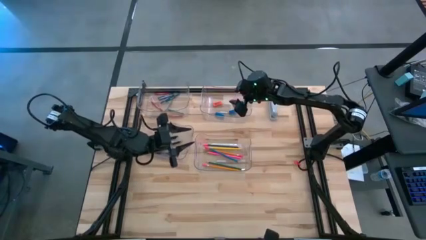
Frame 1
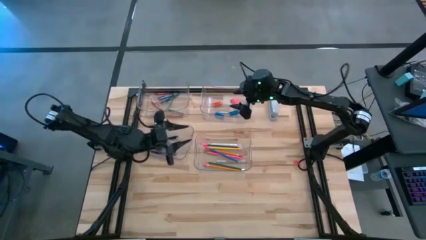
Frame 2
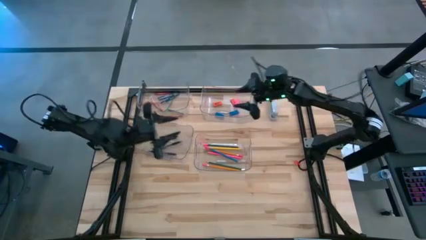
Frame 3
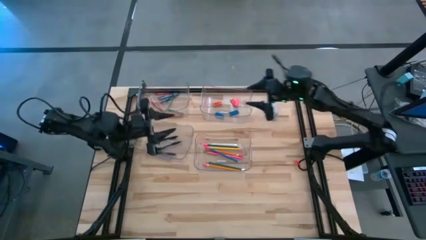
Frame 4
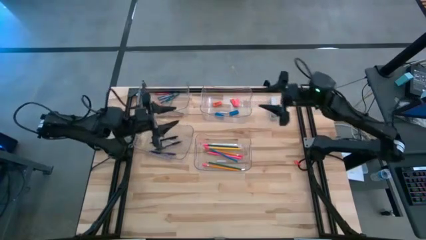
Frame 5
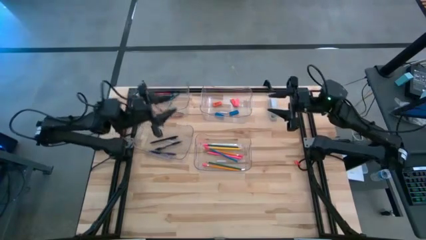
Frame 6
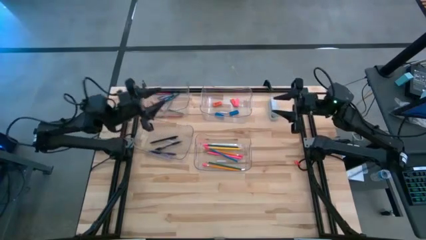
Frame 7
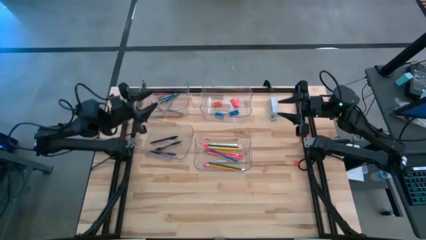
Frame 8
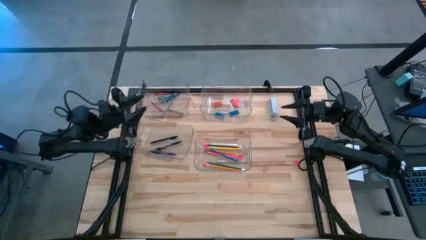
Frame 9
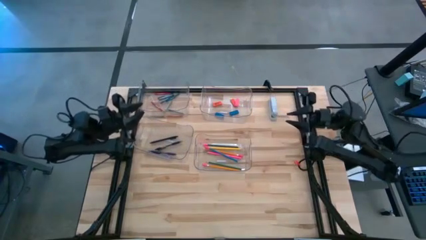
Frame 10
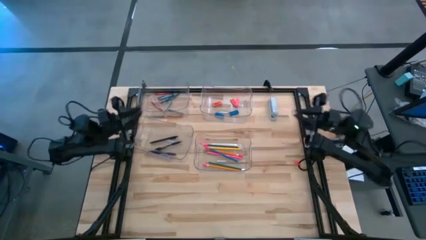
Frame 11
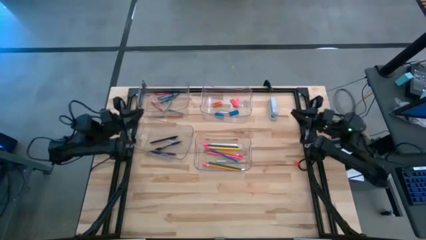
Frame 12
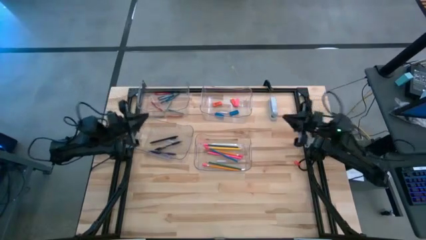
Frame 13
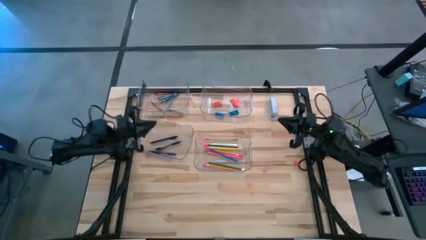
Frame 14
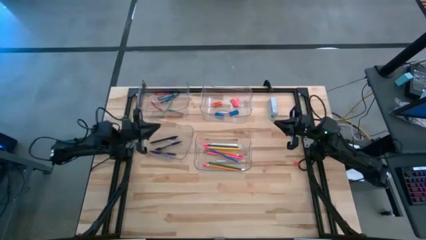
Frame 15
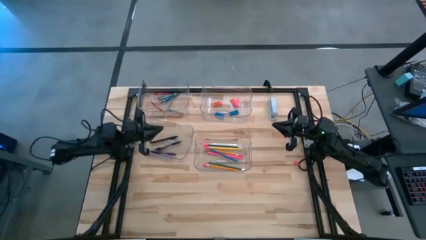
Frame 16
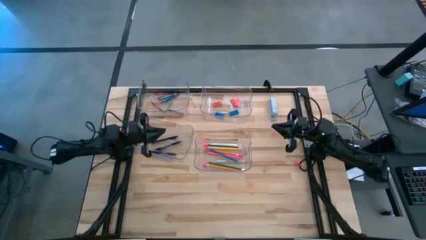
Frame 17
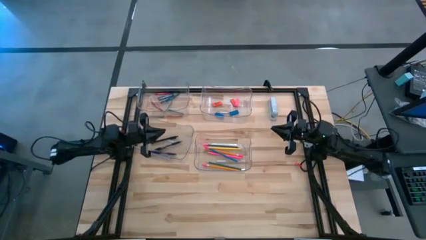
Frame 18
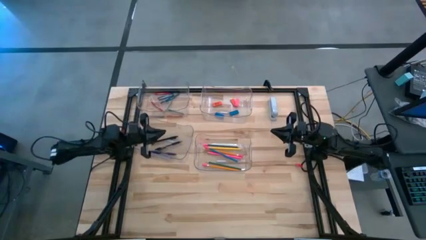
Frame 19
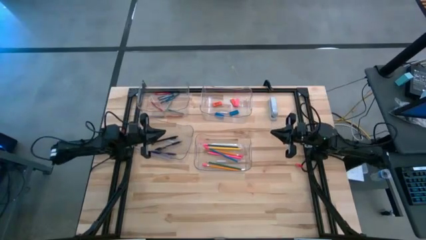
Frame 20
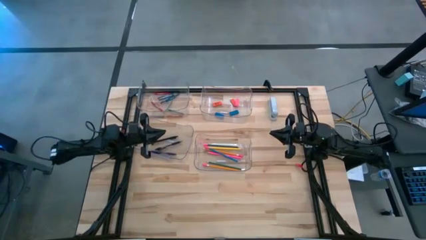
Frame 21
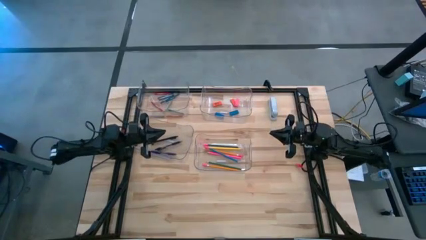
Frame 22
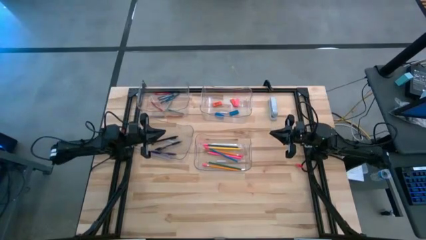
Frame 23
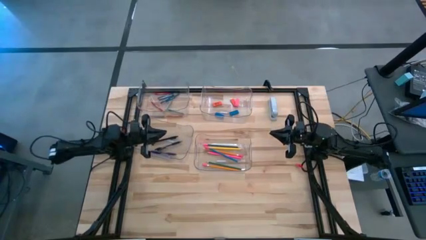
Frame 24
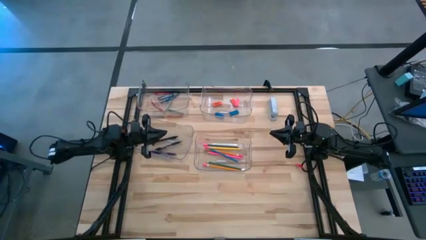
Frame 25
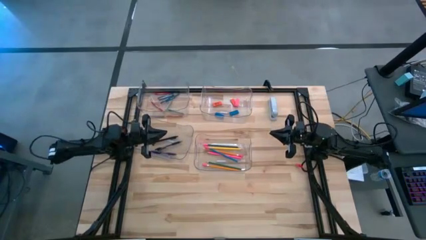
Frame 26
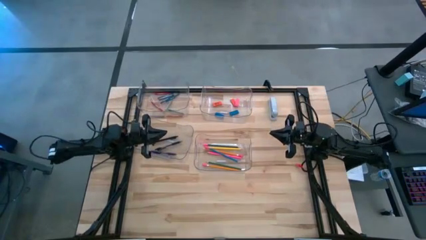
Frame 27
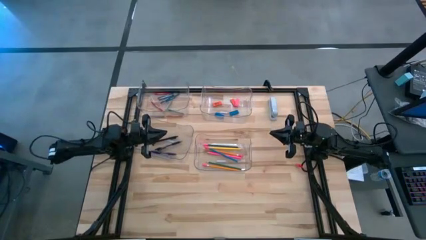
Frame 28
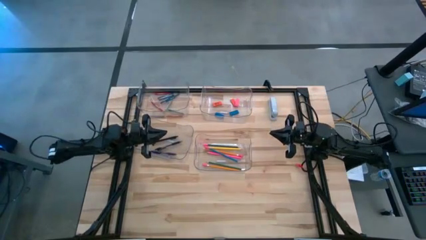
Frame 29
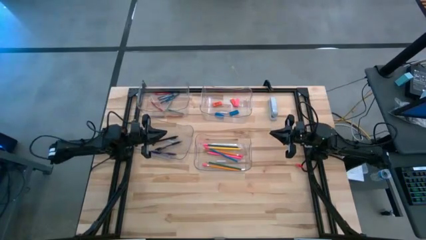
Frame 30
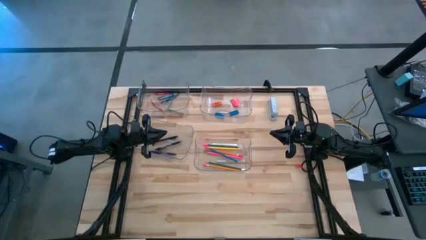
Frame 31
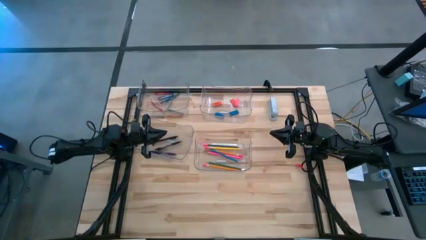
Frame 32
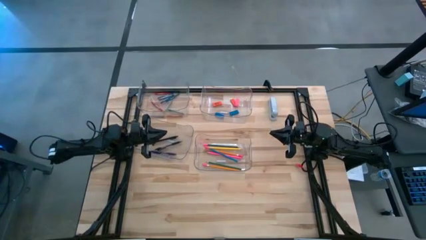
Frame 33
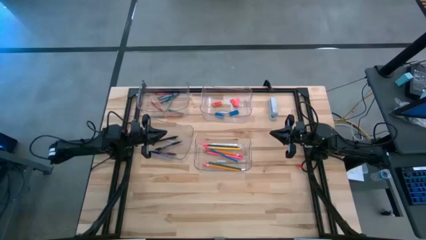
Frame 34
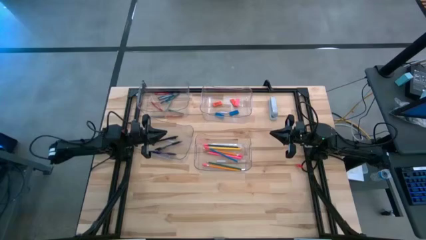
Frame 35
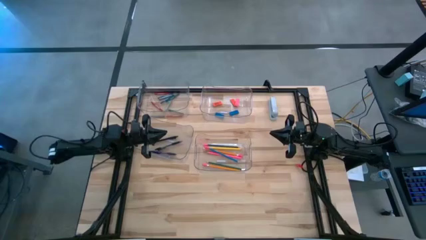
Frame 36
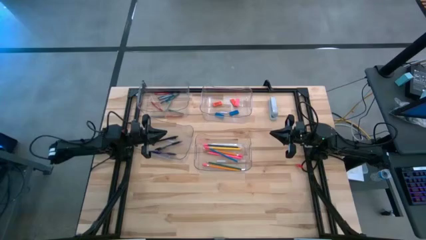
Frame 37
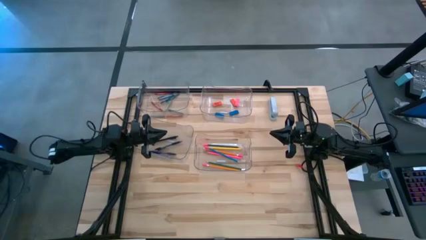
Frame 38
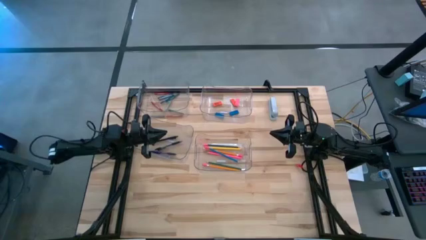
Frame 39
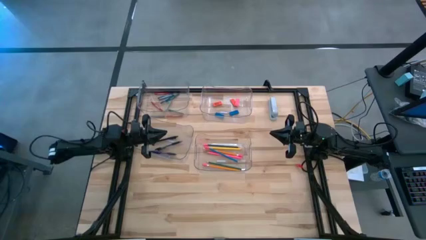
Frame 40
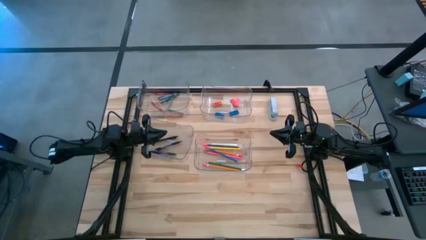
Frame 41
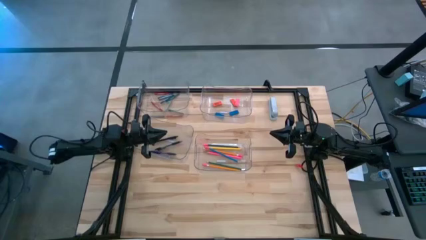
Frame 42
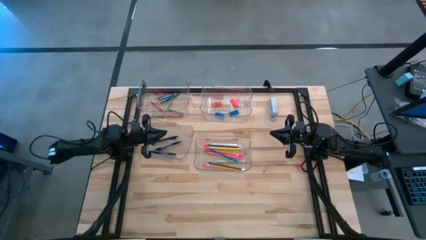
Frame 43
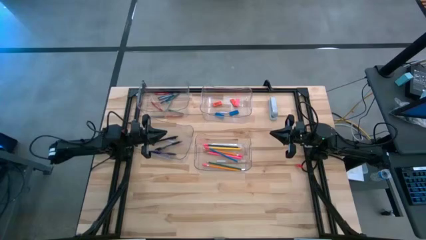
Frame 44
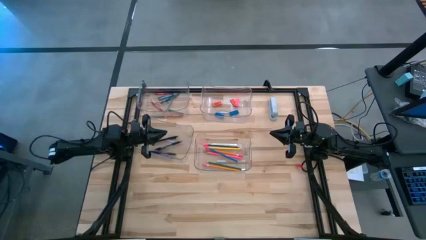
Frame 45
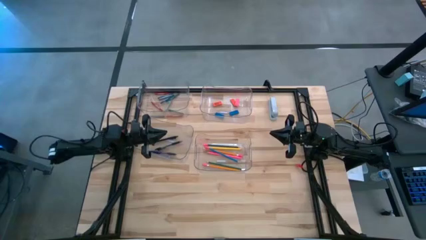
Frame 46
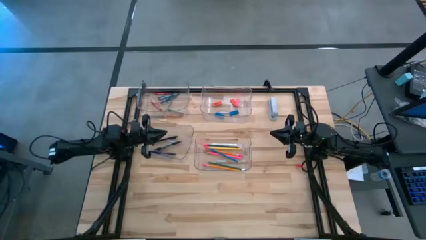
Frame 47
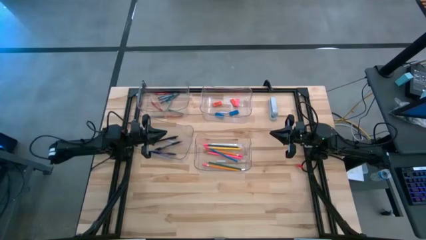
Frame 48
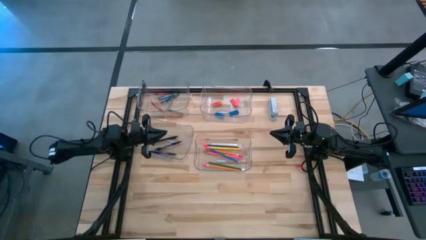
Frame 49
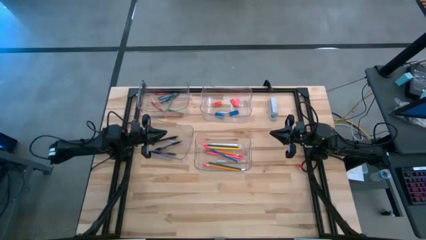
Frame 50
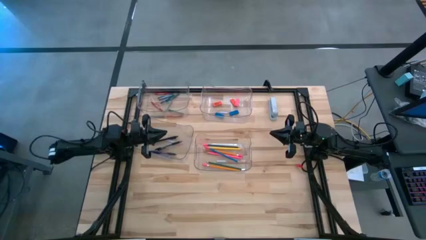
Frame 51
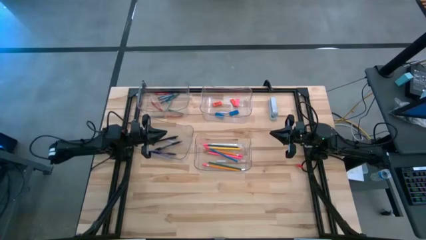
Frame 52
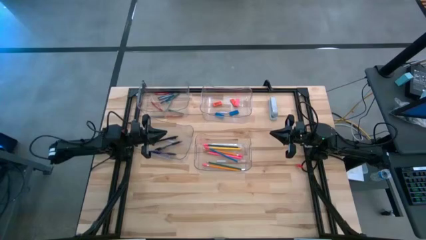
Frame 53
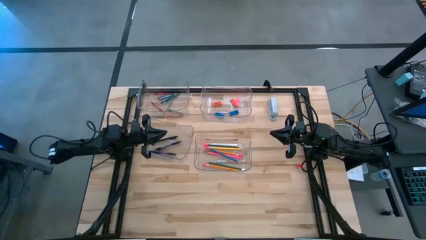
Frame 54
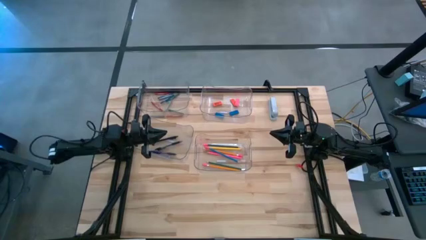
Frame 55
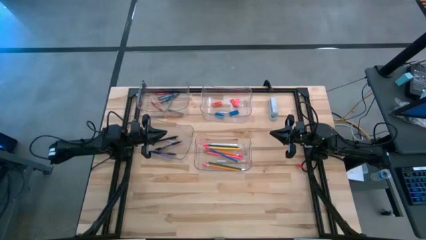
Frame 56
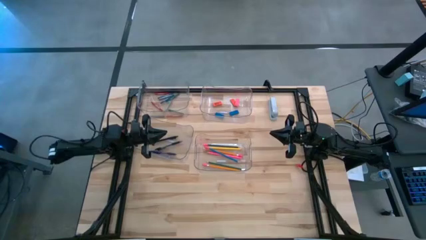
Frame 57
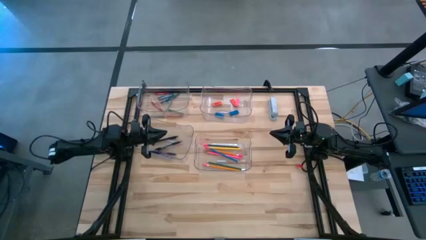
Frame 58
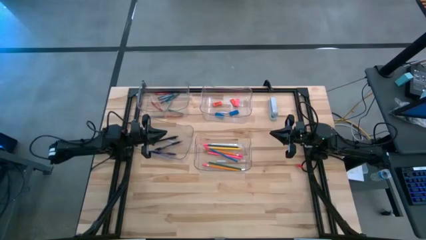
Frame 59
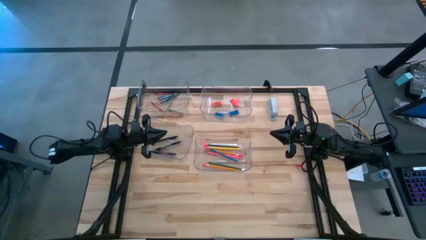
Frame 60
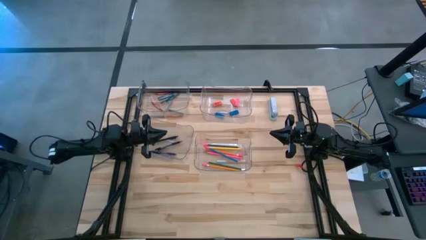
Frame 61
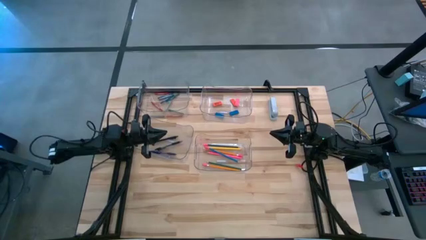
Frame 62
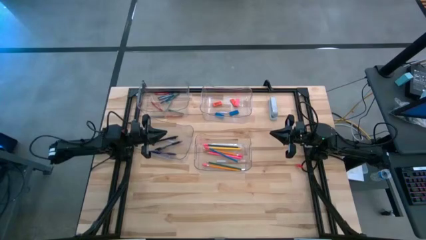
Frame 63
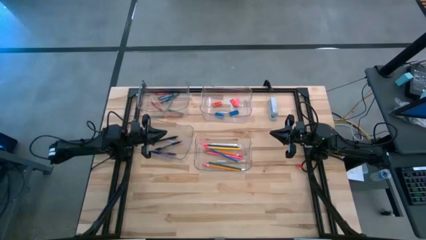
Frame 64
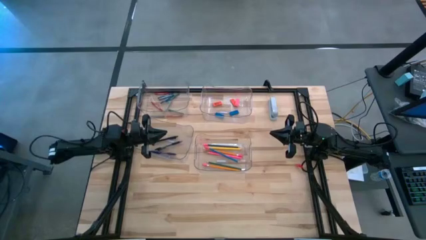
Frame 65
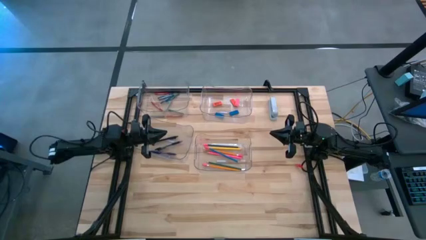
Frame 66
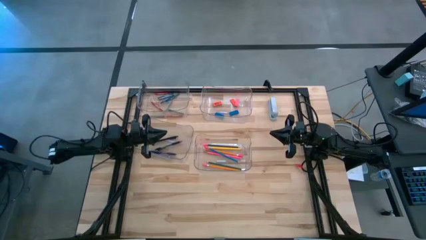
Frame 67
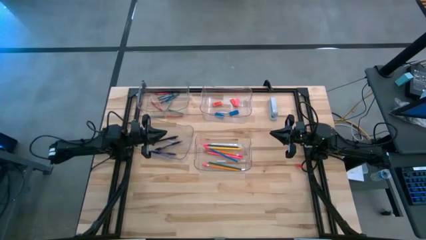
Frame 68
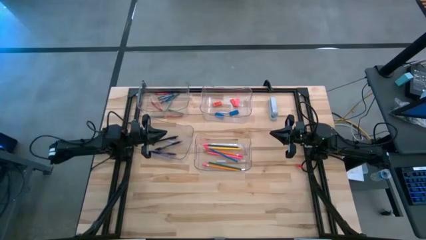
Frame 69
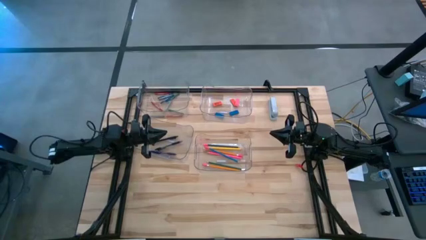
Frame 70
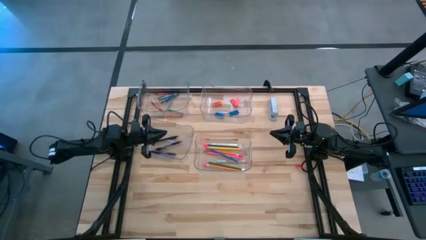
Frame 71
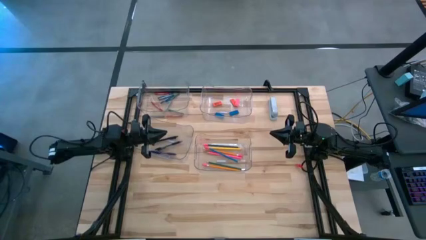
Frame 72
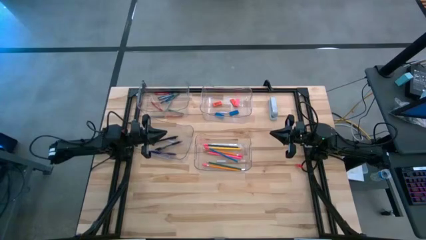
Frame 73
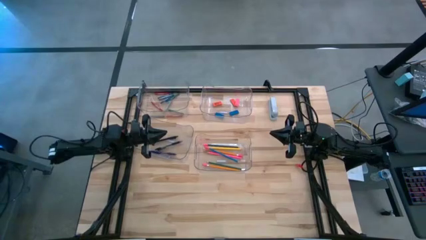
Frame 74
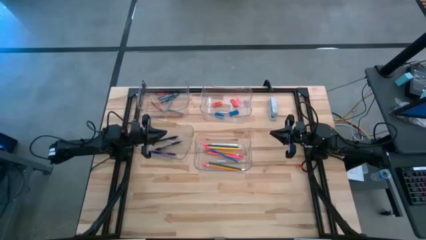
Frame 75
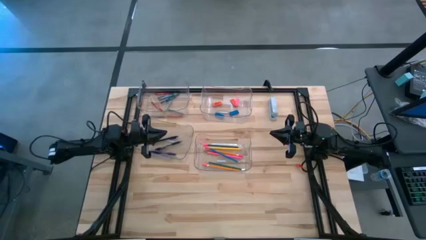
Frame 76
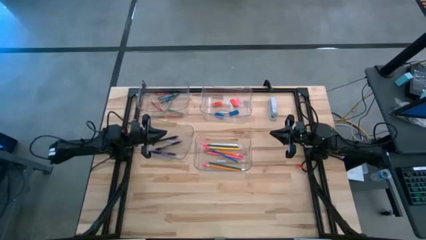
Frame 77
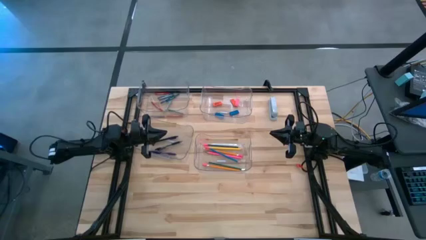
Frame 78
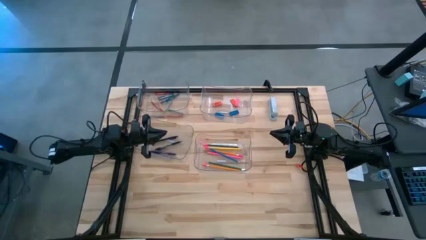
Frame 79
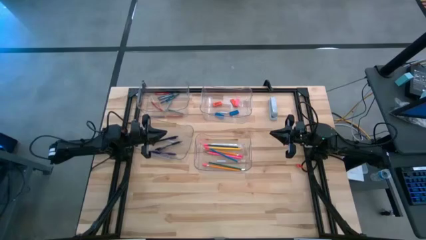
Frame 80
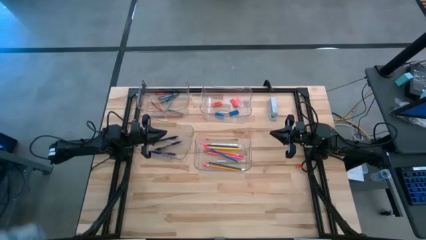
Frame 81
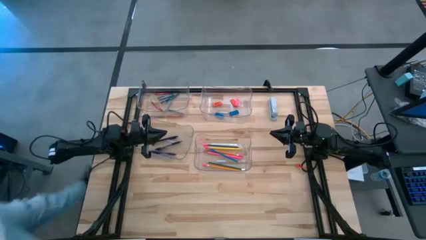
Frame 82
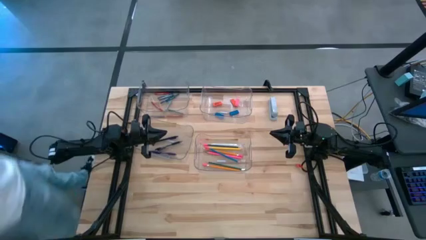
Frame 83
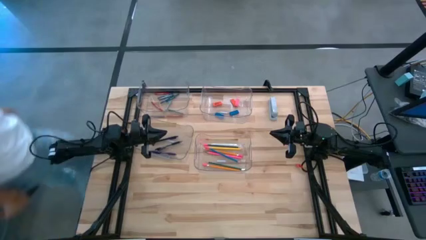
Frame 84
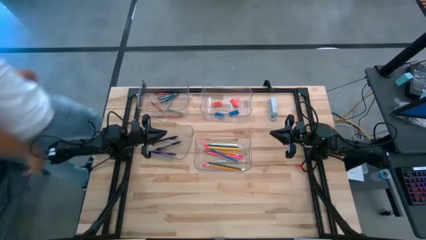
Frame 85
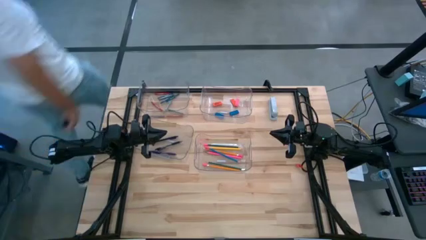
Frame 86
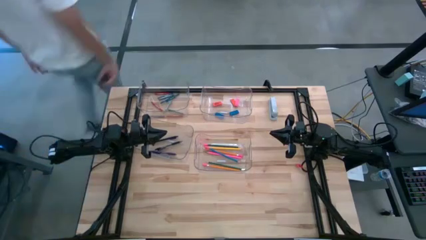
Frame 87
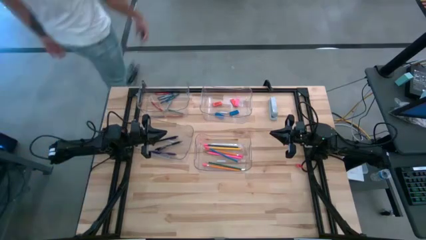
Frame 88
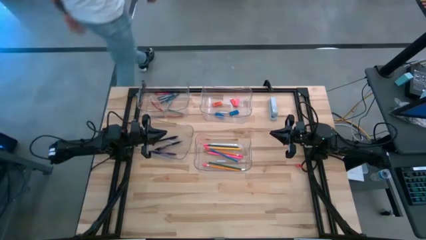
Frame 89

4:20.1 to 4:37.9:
Task: Sort crayons/erasers/pens/pencils in bins
Return to Home Position
